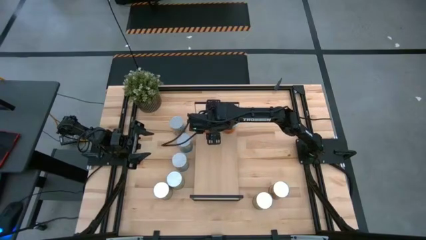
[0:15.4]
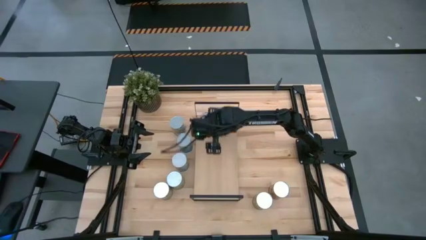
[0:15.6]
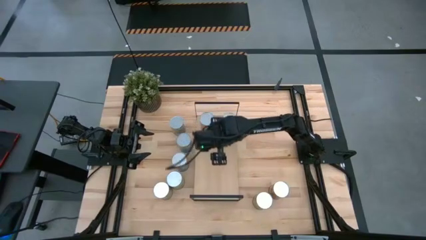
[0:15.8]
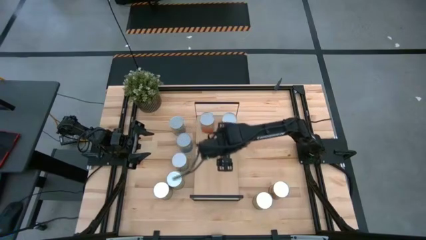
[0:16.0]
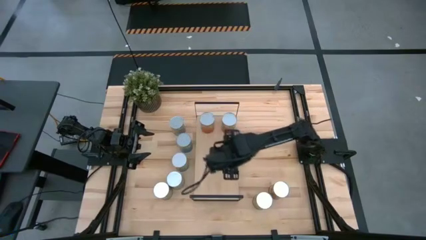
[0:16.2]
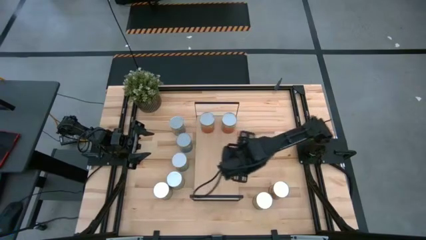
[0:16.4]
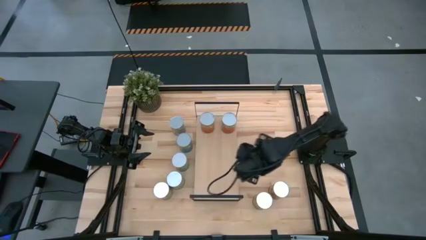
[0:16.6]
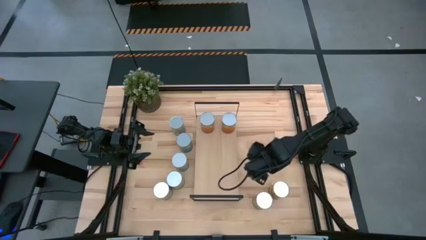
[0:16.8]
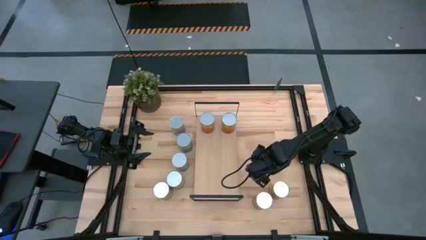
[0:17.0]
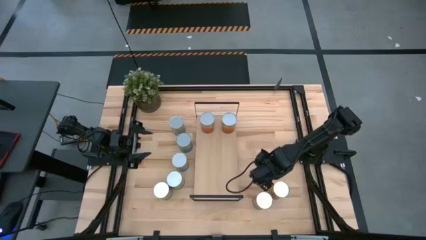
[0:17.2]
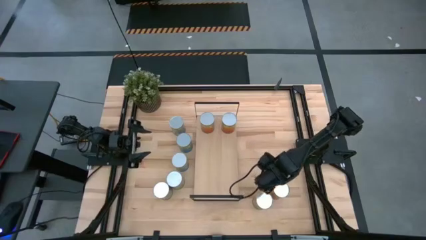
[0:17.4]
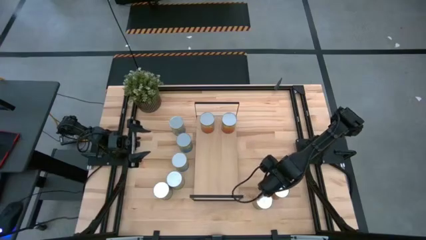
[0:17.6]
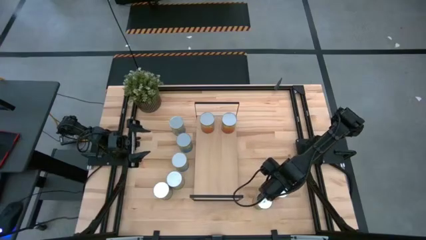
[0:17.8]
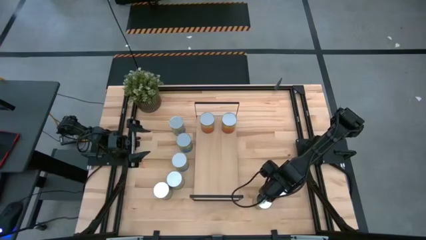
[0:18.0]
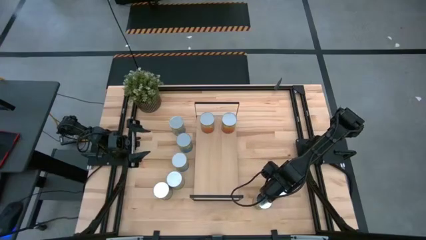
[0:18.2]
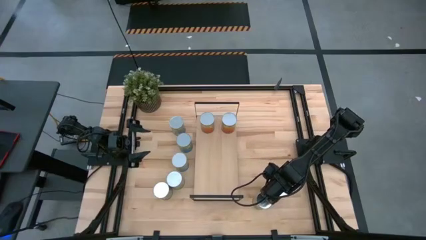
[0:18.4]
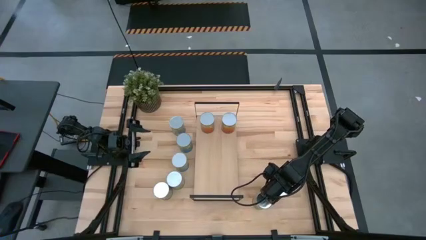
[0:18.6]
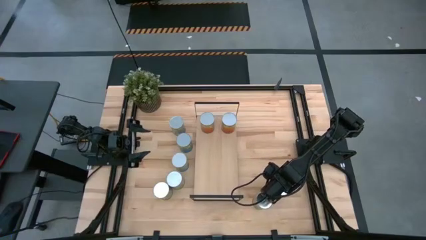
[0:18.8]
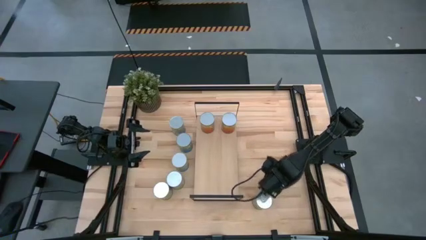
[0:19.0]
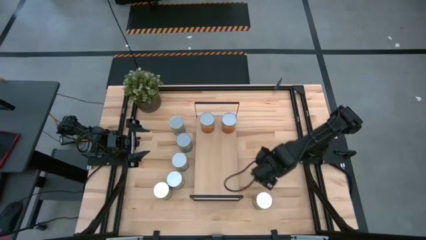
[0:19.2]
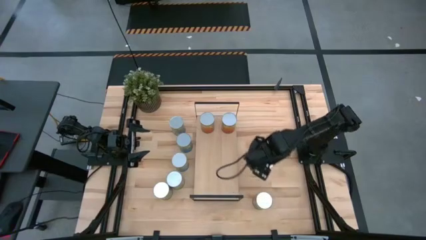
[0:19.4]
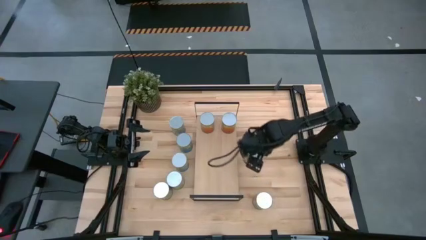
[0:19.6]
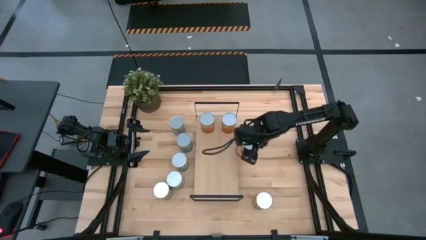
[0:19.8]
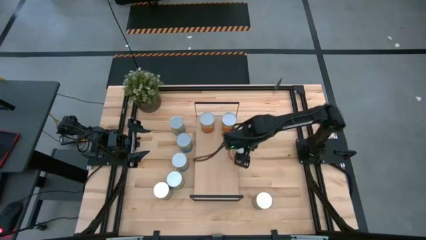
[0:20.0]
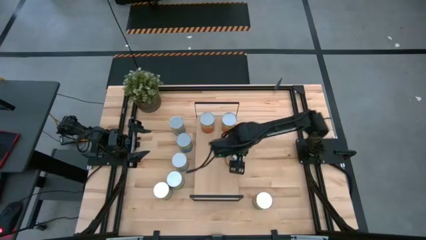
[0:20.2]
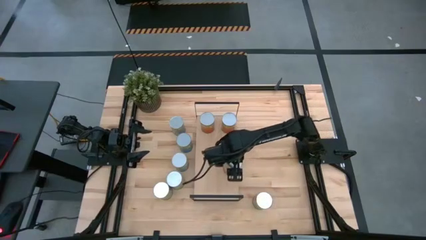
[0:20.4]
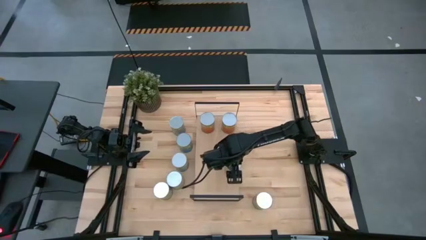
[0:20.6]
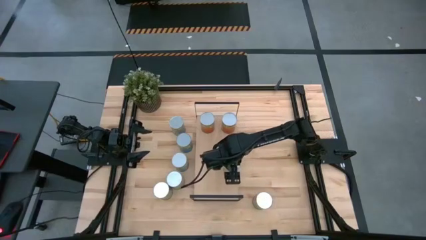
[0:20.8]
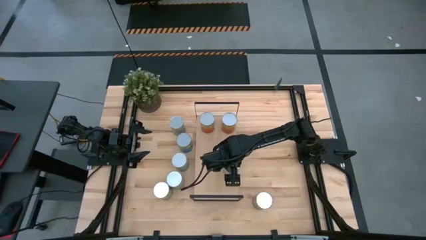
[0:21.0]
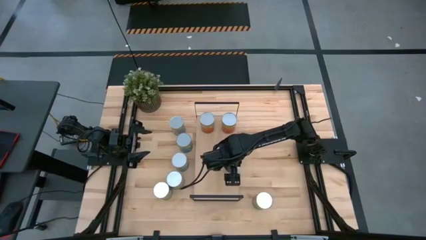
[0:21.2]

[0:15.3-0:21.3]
Task: Pick and place cans onto a shelf
Put the canned corn on the shelf

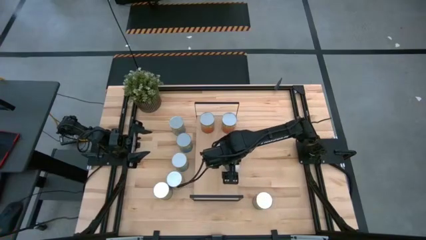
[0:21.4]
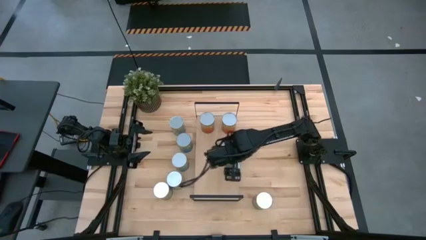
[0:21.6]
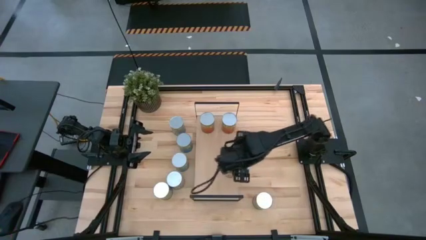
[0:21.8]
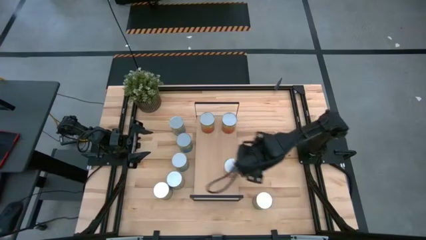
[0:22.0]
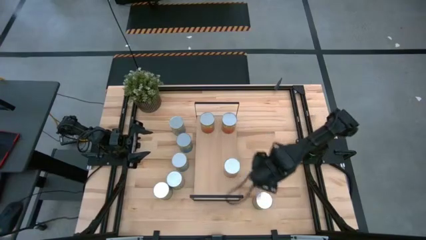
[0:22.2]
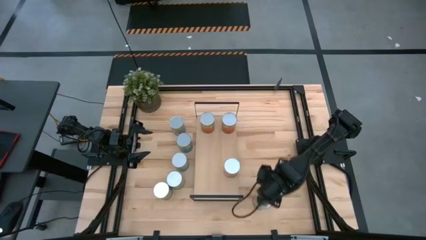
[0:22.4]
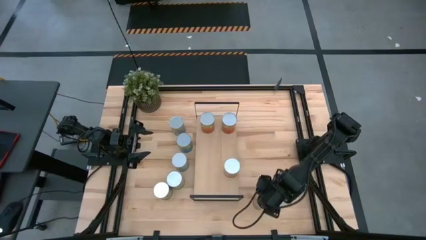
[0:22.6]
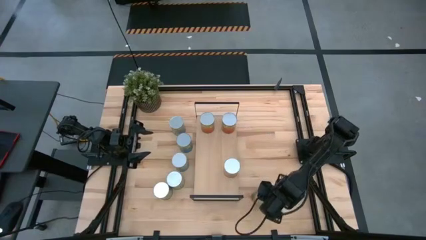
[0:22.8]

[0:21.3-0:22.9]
Put the right canned oranges on the shelf

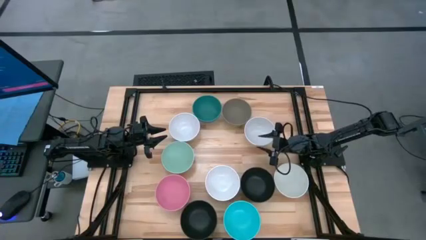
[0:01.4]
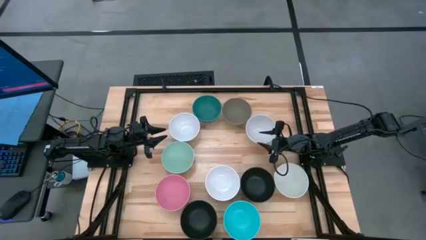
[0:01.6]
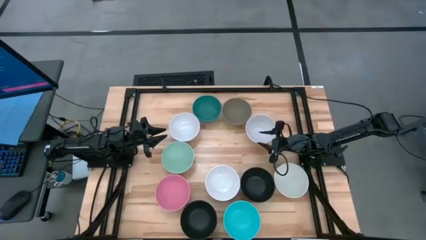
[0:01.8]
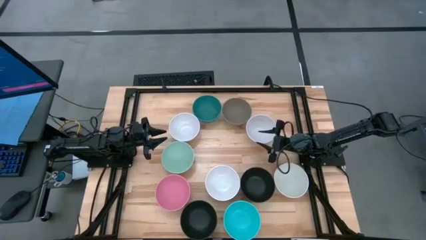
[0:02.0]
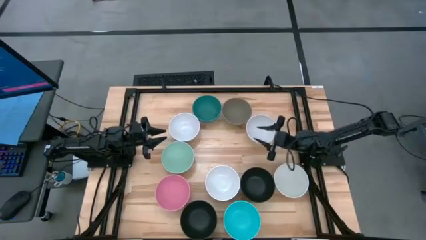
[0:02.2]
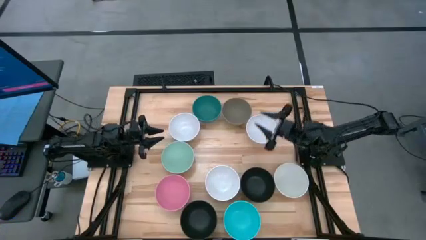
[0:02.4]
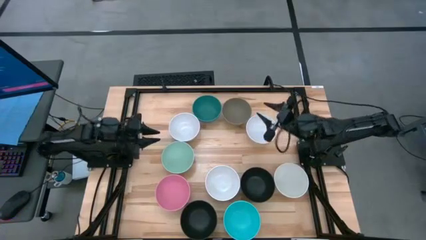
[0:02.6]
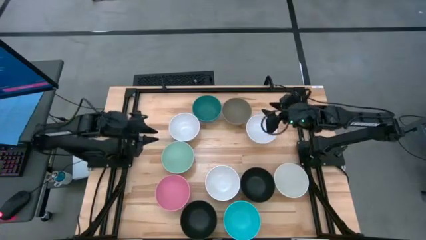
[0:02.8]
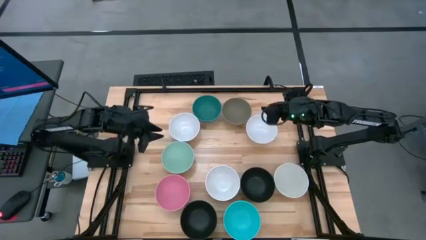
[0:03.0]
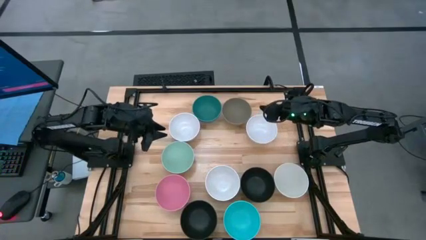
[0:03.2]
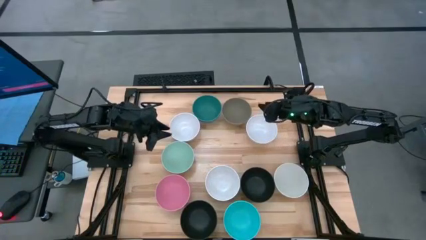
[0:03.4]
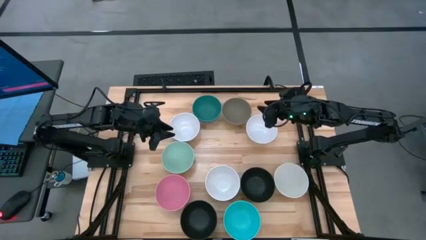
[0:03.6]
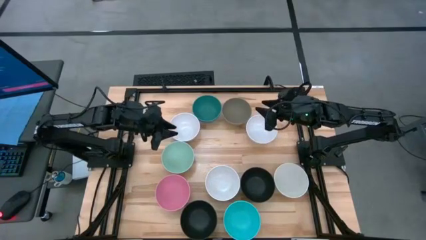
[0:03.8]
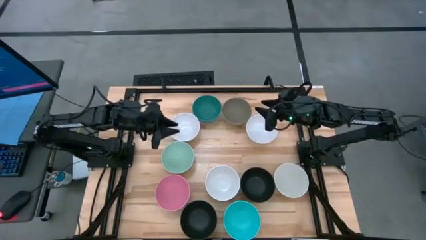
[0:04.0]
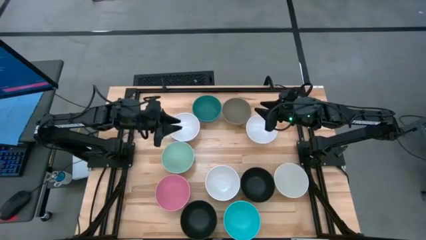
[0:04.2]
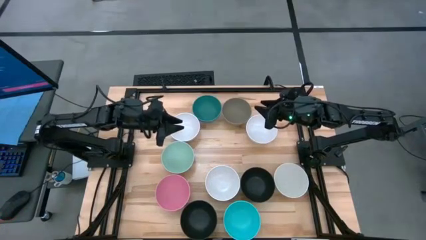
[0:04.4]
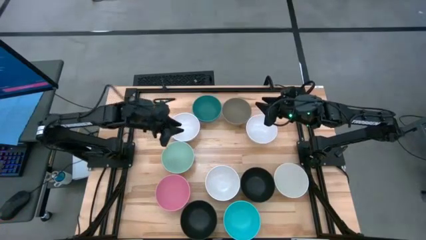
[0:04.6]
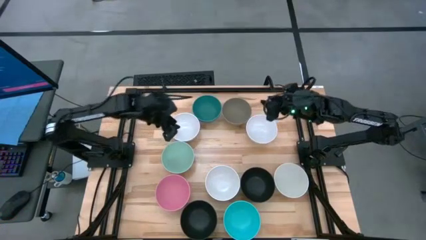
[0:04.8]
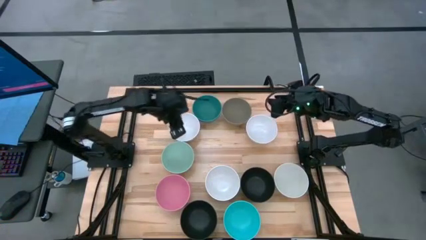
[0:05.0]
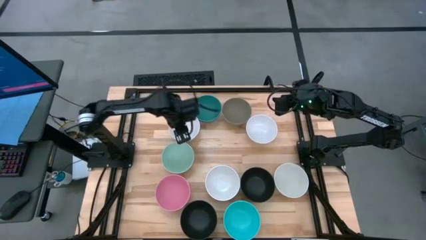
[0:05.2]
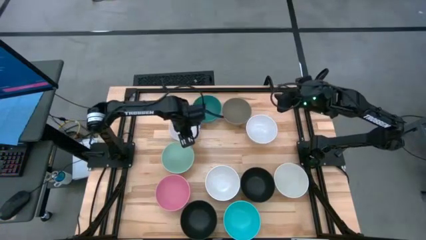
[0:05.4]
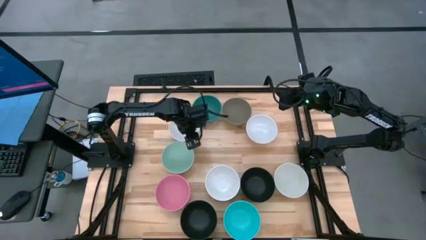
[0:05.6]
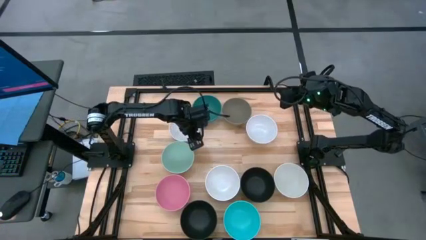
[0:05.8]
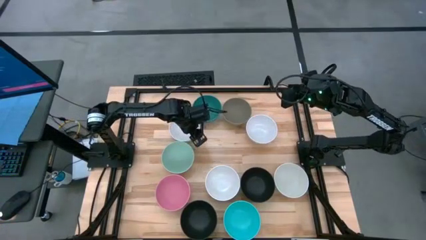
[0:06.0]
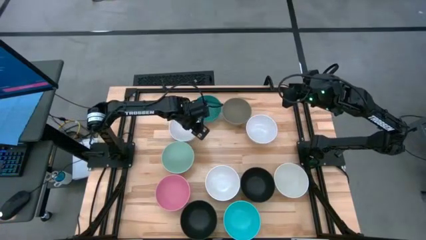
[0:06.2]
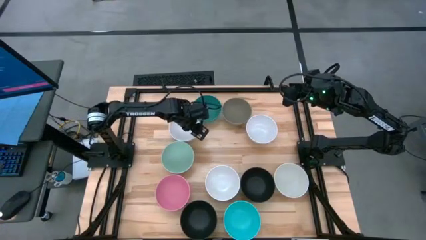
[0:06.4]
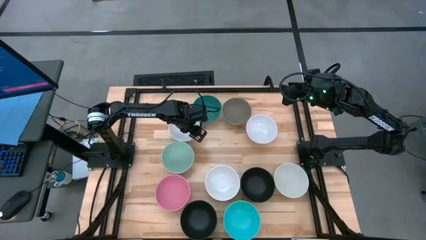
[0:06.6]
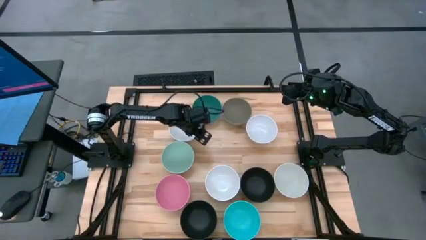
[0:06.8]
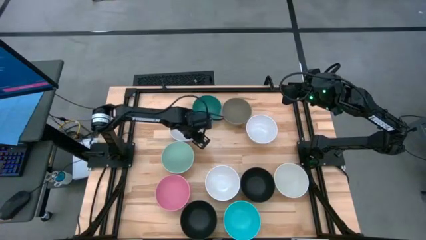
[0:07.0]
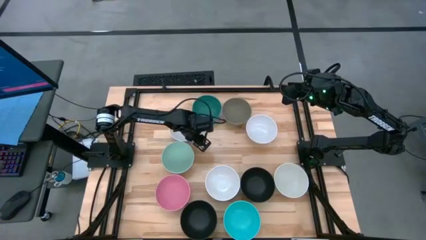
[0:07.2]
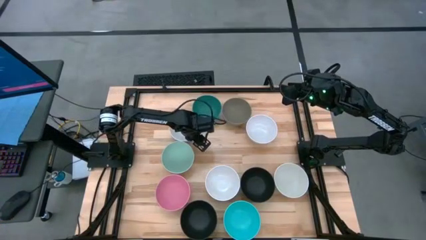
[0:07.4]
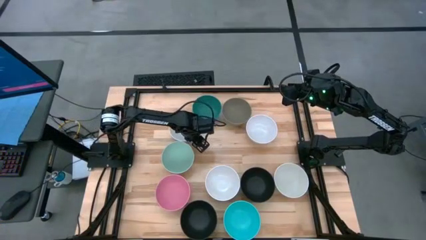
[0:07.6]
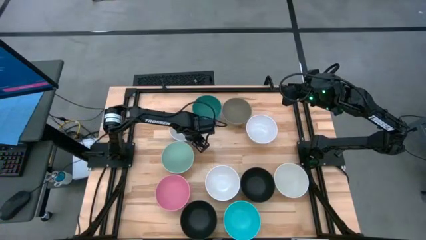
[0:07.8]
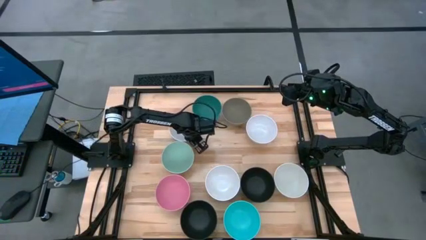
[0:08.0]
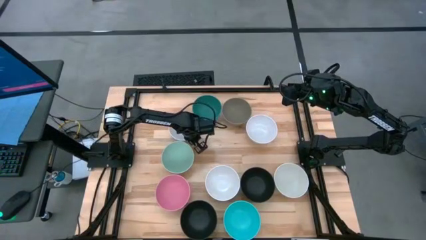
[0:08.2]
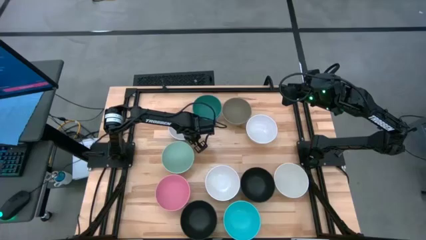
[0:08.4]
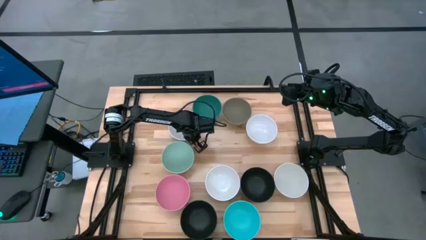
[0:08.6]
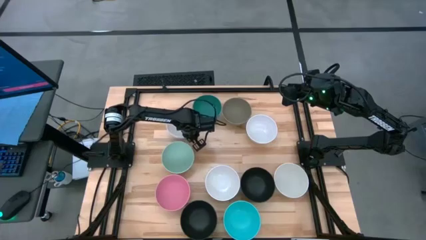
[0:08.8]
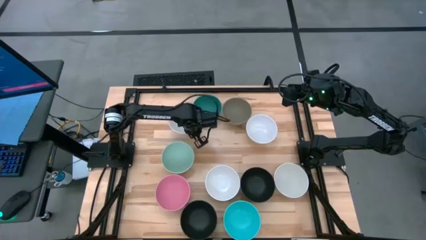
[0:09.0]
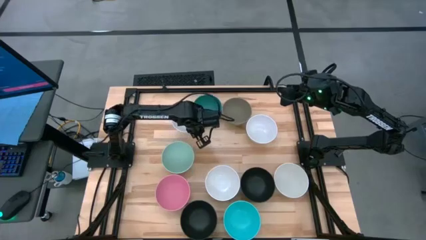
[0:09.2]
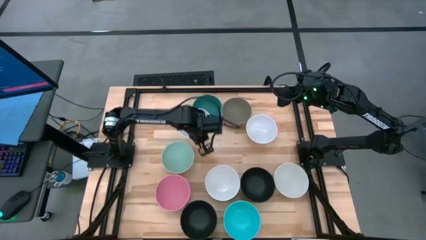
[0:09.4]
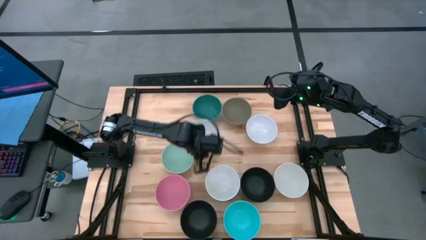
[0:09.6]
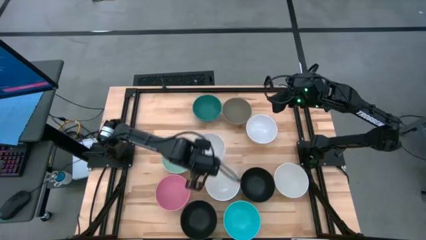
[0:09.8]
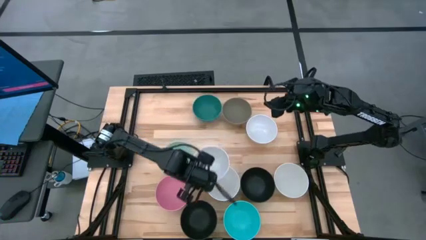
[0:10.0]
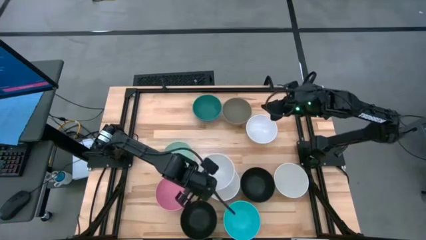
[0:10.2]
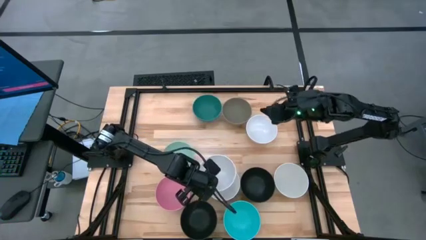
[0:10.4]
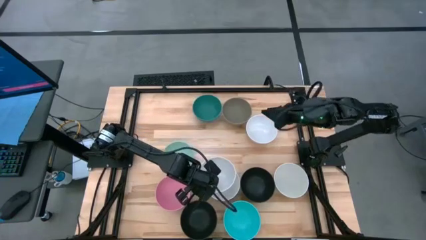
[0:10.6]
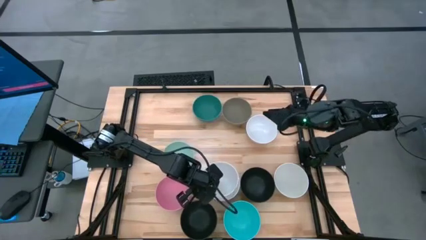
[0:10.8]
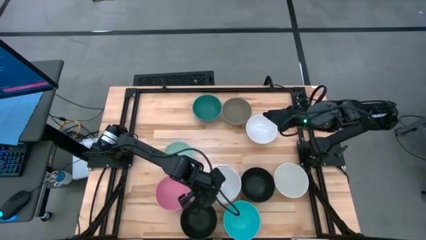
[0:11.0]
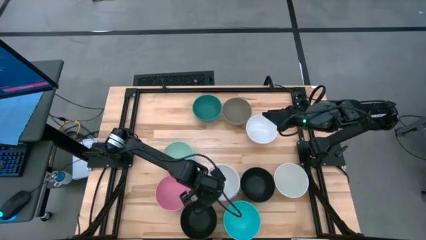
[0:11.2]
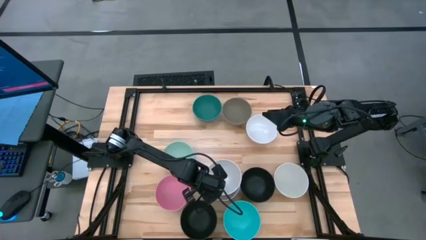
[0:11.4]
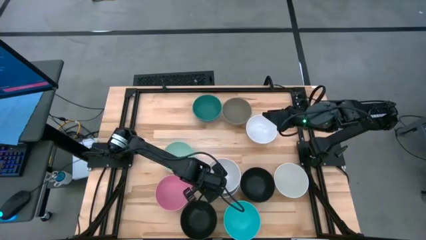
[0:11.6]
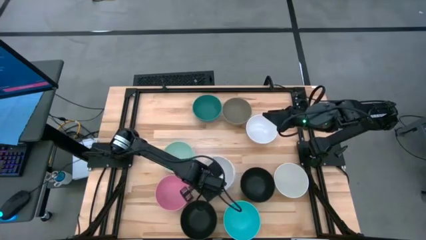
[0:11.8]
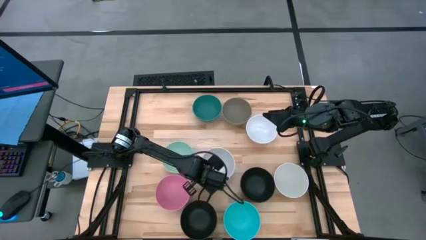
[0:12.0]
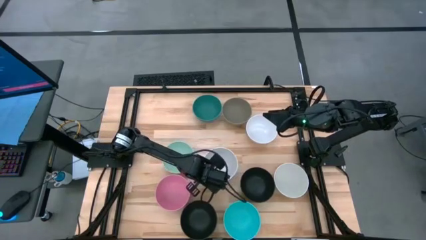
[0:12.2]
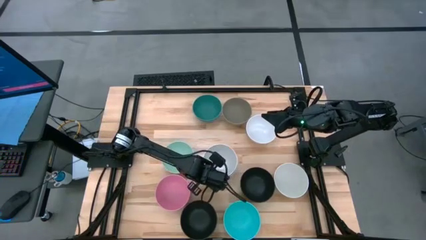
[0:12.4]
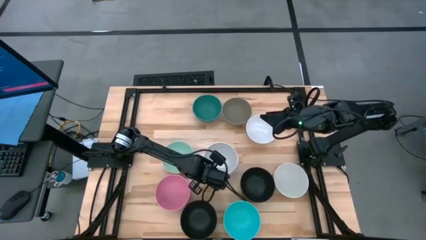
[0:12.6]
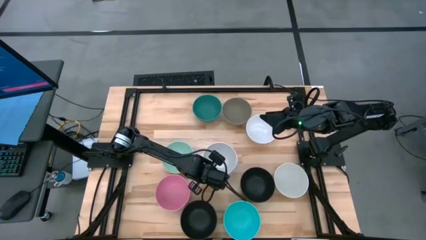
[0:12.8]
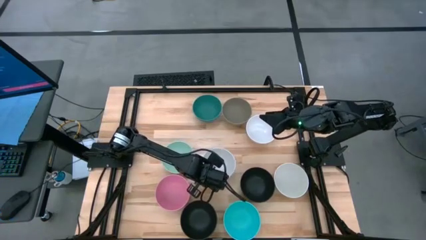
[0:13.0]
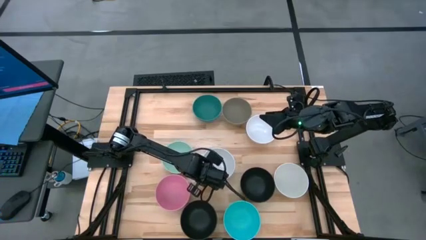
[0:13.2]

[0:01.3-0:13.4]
Task: Nest bowls inside each other
Stack the top left white bowl on the top of the lower left white bowl
